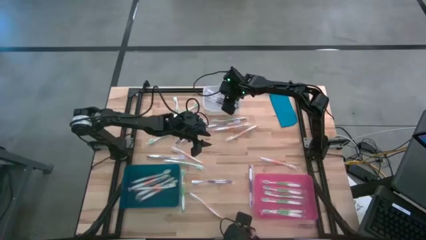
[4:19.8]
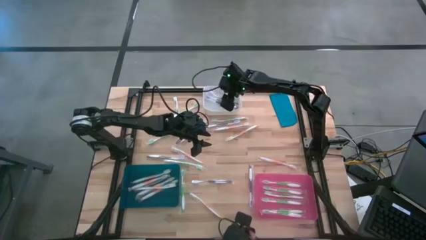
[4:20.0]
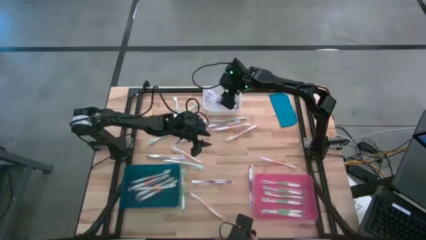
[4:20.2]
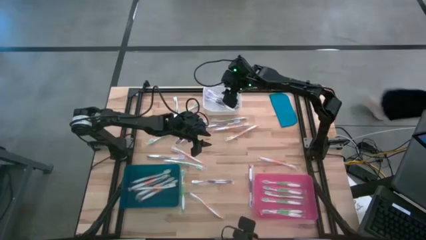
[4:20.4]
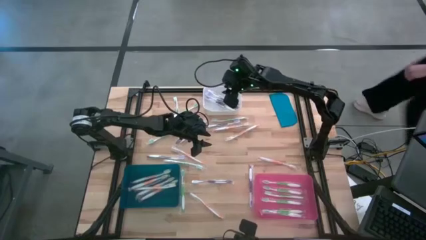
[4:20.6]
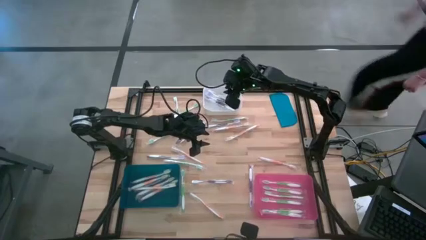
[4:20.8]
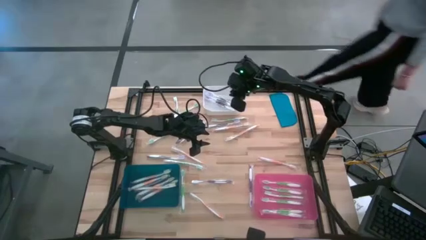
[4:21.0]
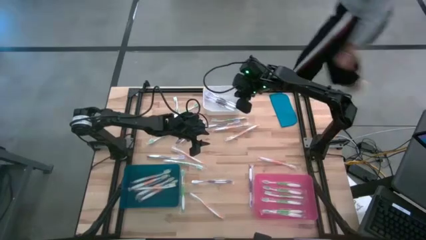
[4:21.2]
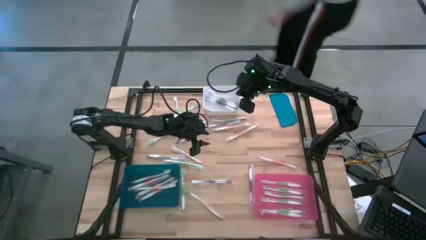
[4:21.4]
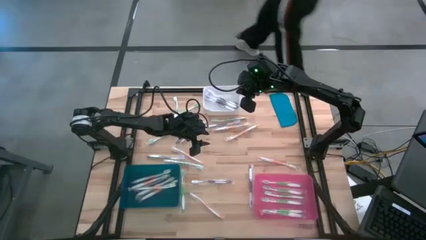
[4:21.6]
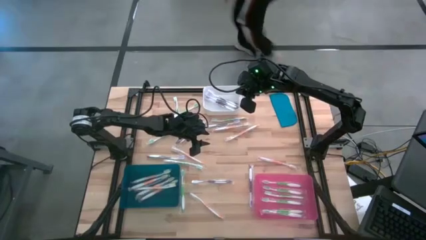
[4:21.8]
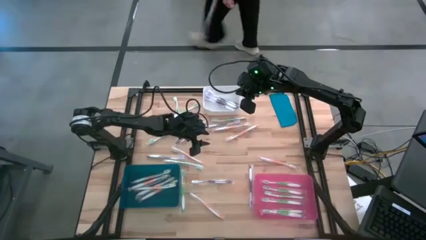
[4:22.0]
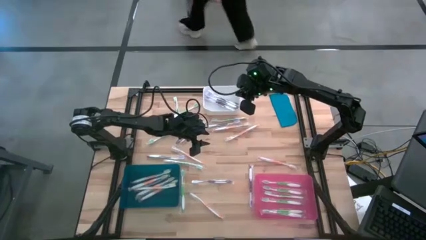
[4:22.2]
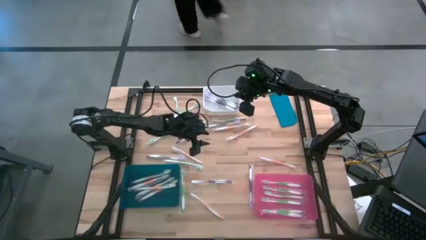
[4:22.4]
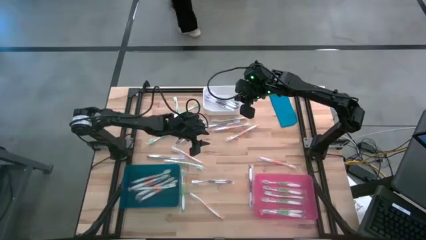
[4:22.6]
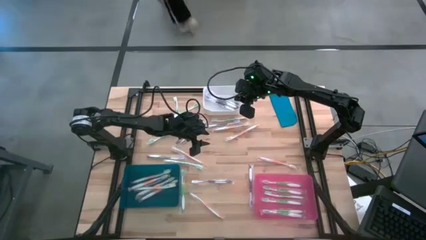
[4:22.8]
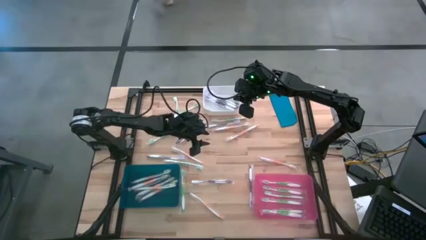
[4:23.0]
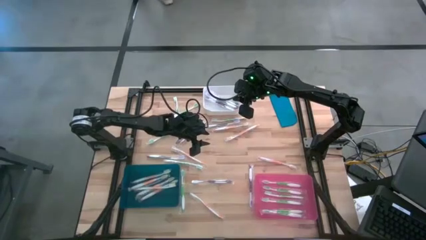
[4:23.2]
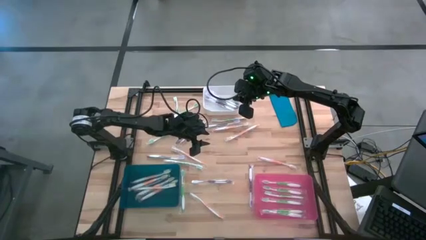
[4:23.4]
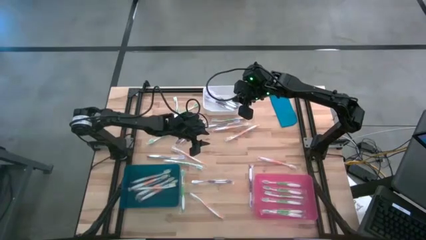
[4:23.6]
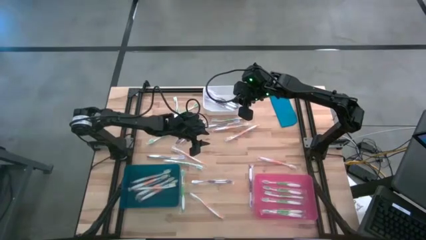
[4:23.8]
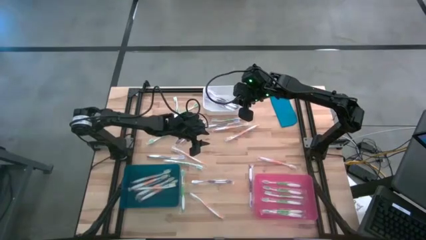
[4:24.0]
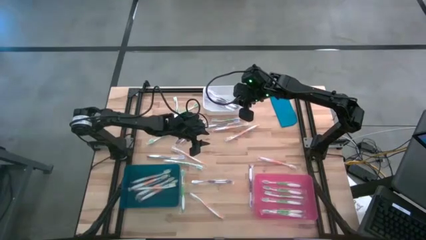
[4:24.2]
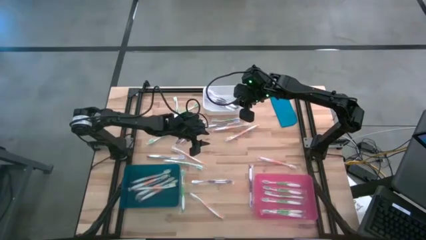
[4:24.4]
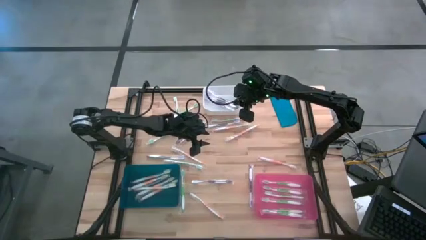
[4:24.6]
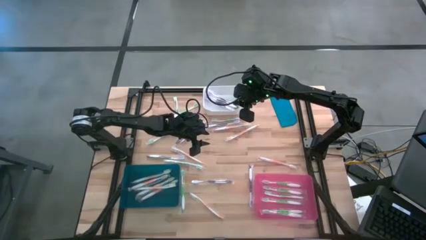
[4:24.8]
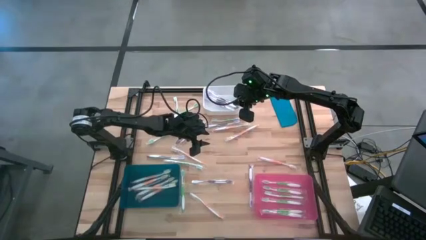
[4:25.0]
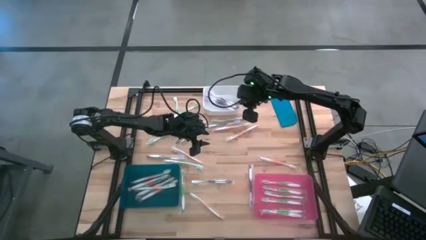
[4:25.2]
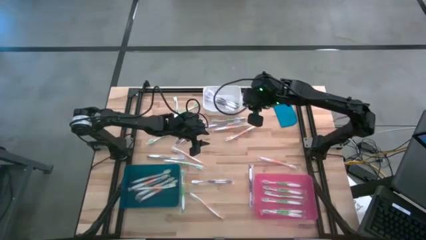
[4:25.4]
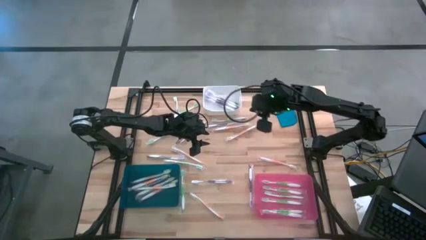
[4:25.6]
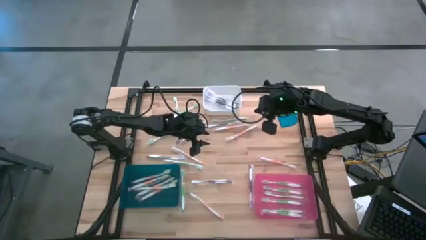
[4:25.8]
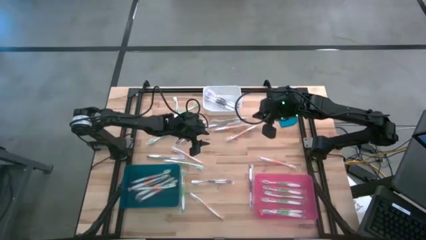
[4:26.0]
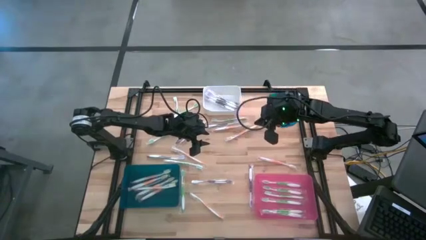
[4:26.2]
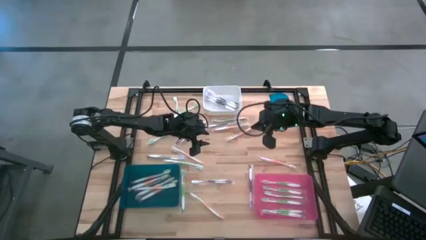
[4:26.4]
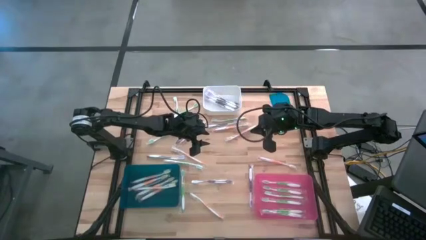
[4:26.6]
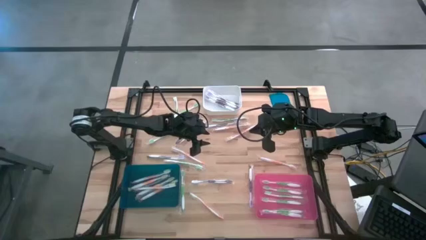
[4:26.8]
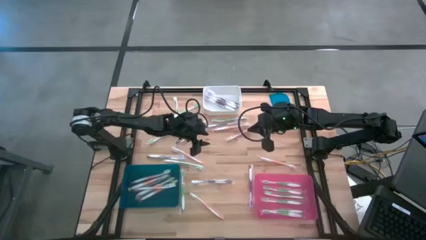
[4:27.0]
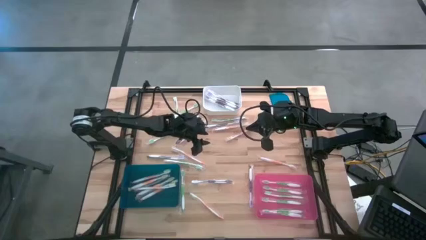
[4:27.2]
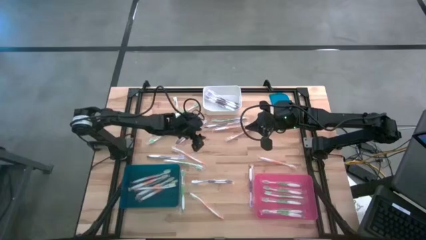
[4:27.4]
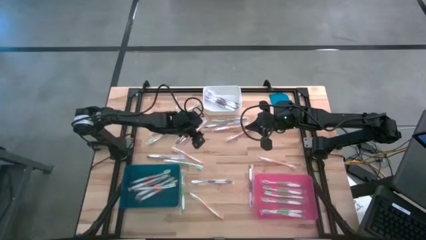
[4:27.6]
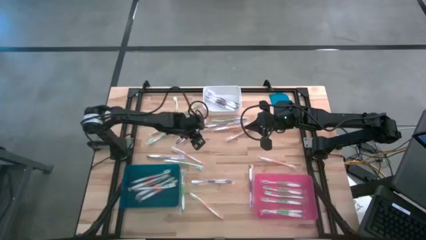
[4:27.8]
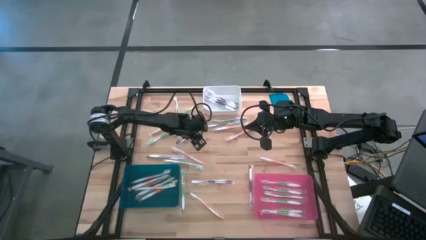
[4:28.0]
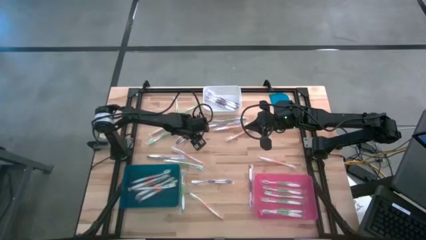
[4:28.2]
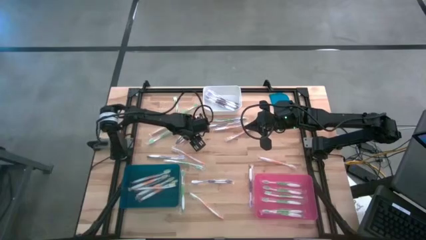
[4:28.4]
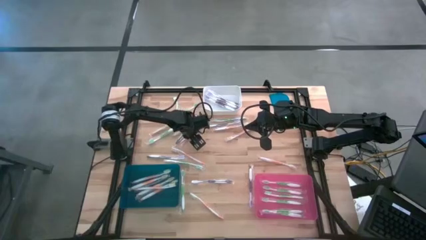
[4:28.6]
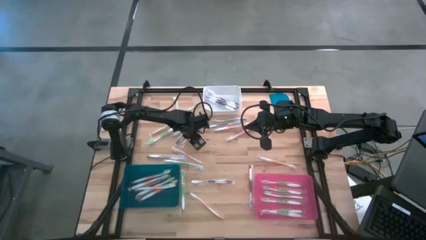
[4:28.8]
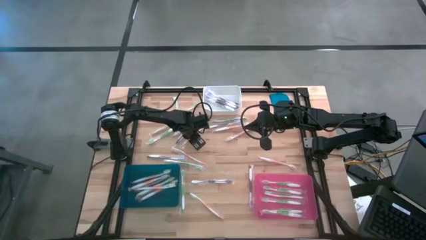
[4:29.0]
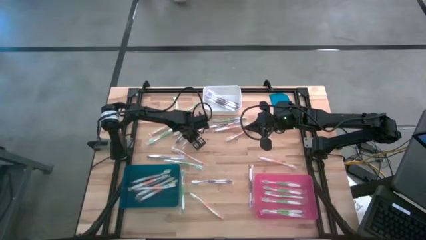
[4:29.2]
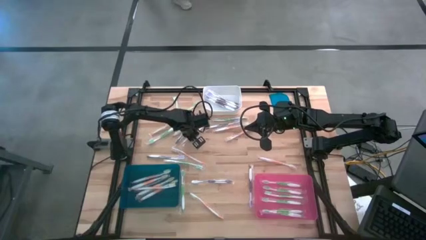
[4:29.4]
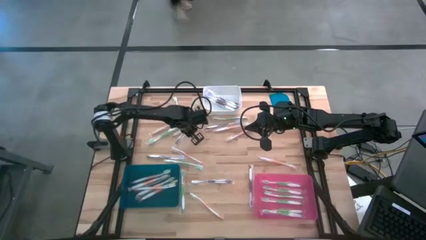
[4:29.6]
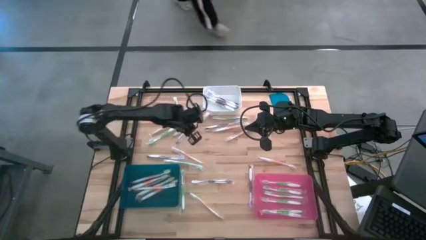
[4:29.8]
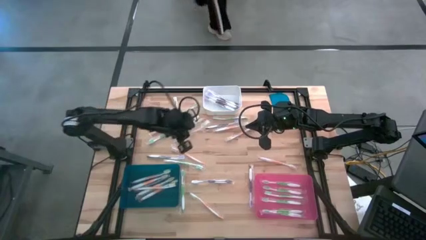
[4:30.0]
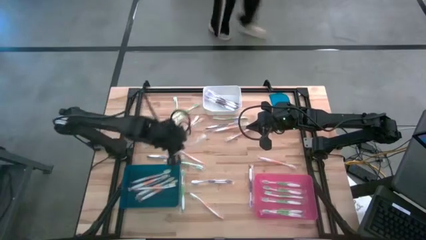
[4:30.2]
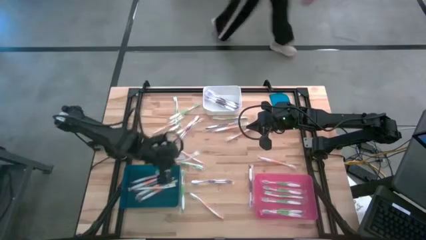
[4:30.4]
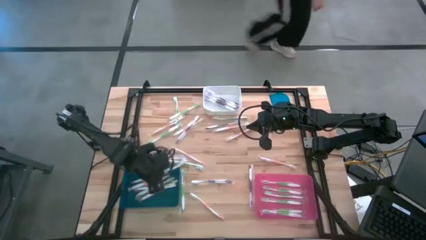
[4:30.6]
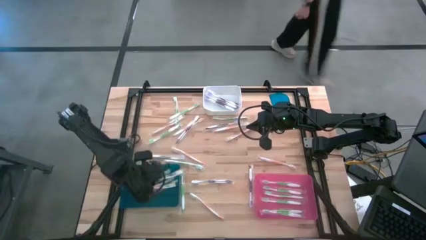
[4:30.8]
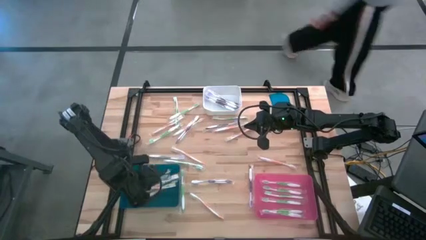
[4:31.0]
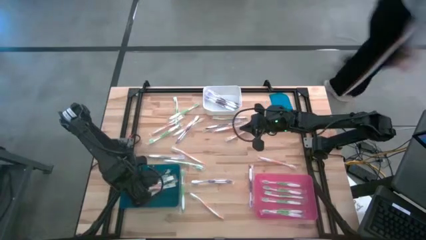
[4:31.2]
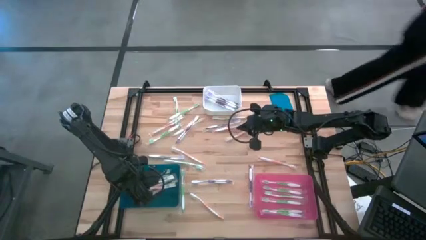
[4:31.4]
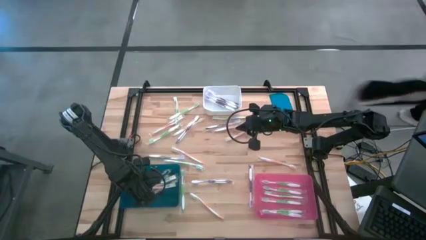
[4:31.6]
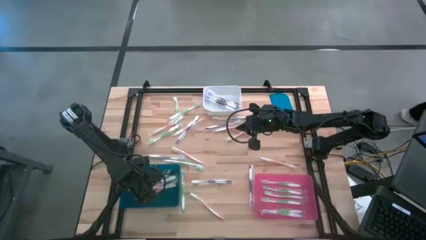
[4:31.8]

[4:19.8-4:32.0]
Task: Pick & Place Toothbrushes
Put the orange toothbrush into the blue bin
